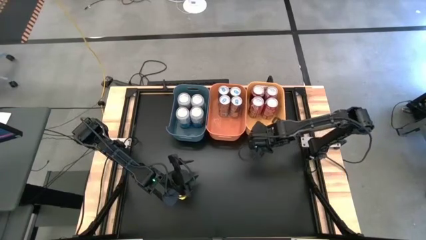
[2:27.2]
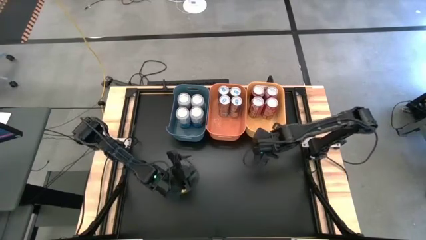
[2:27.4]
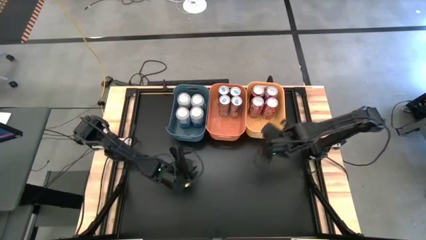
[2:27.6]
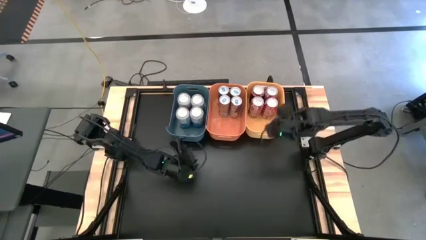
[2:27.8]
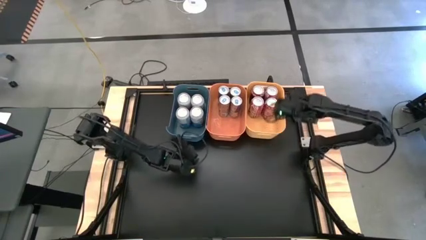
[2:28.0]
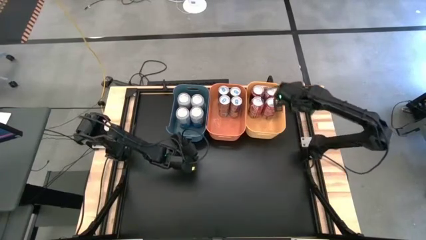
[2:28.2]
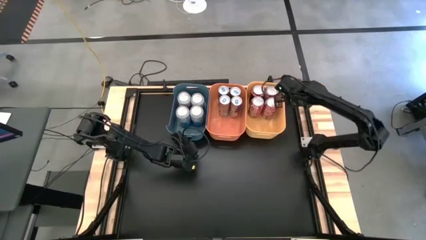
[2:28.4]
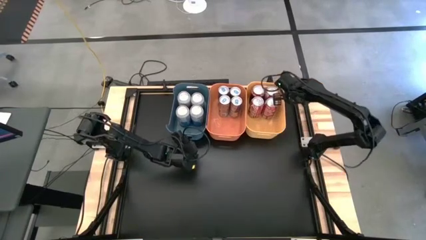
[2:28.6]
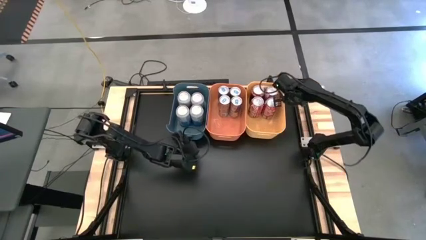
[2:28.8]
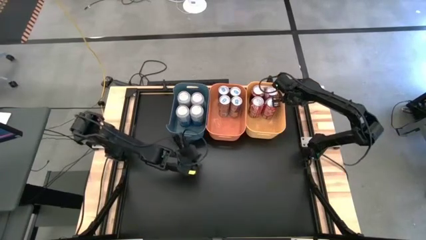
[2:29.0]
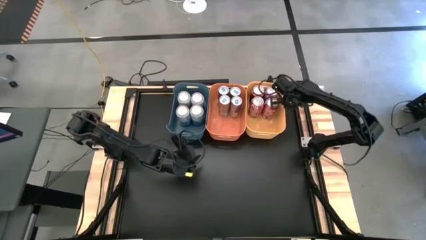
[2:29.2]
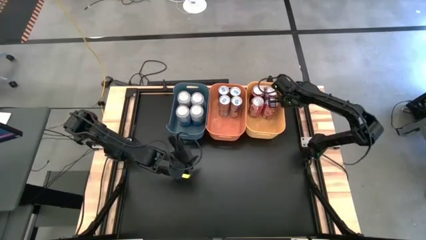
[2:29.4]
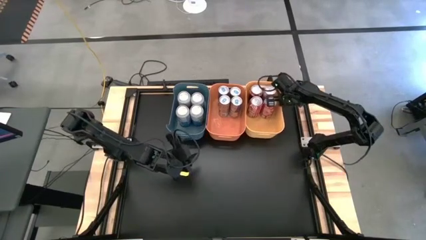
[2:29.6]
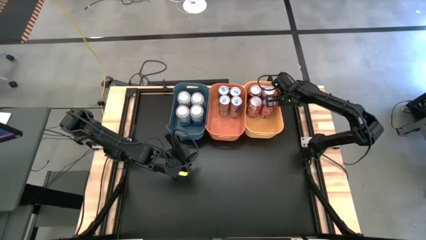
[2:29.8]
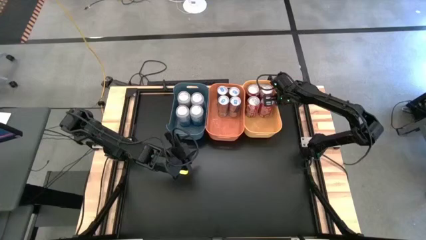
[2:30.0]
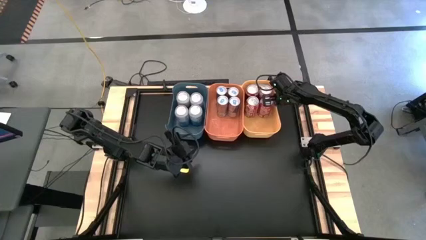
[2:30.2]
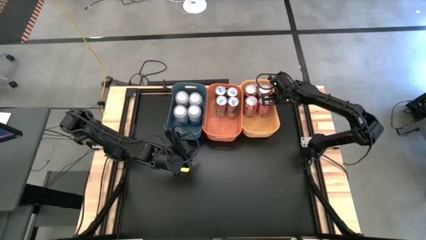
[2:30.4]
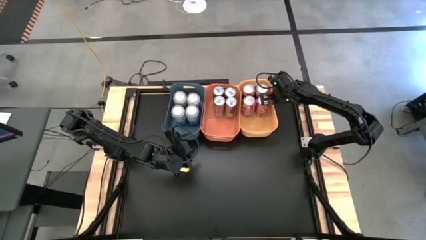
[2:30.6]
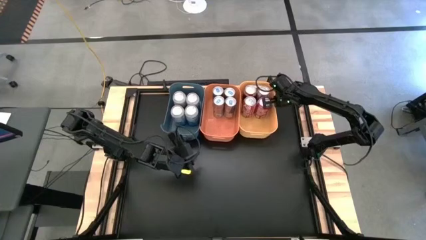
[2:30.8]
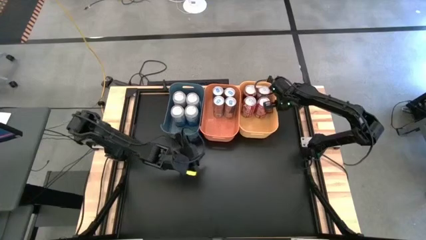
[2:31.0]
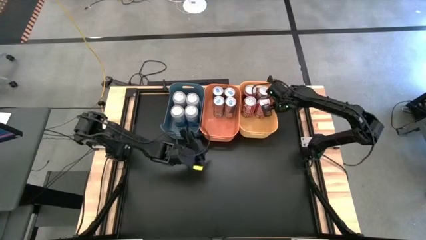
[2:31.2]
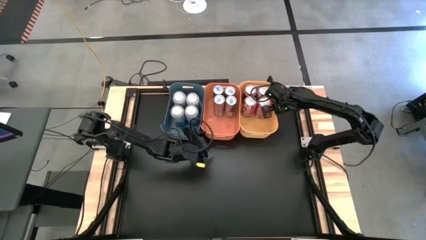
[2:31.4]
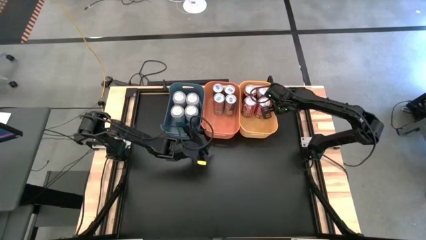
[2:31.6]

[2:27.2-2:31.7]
Task: Sort soda cans
Adjust the bins to align them on the table

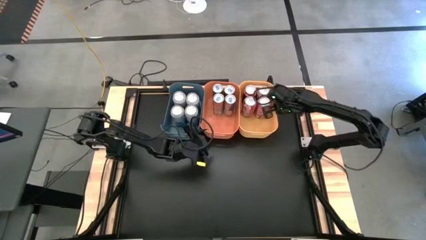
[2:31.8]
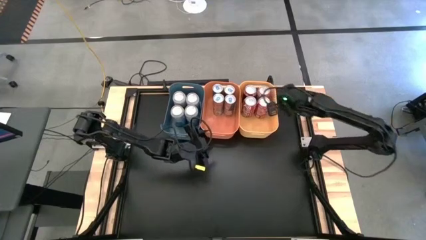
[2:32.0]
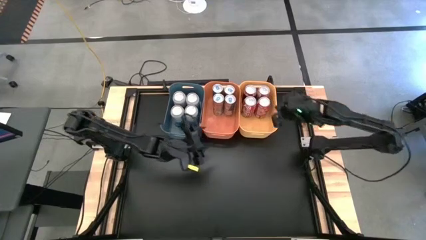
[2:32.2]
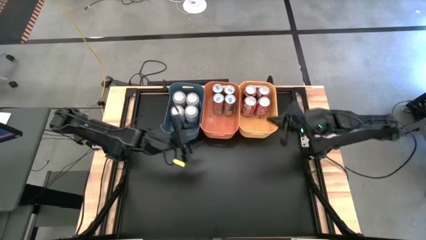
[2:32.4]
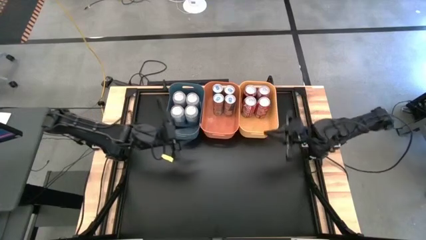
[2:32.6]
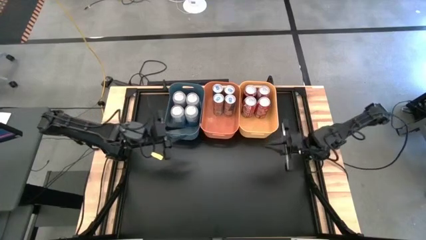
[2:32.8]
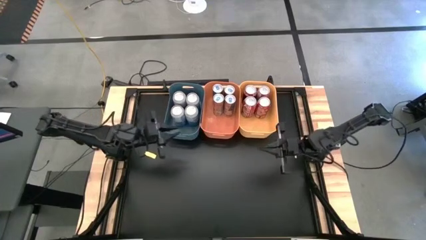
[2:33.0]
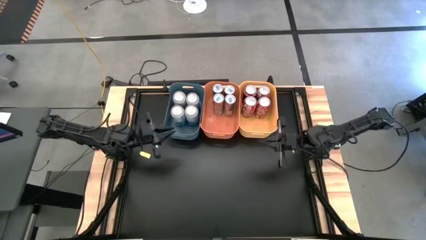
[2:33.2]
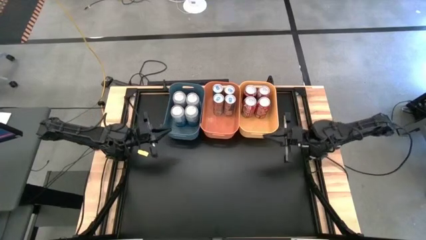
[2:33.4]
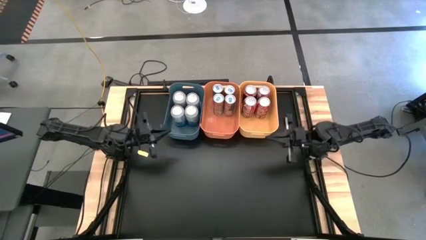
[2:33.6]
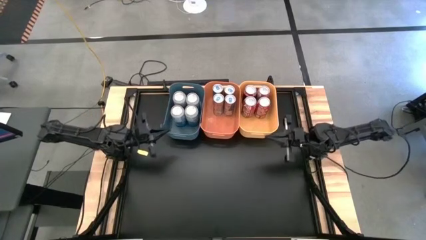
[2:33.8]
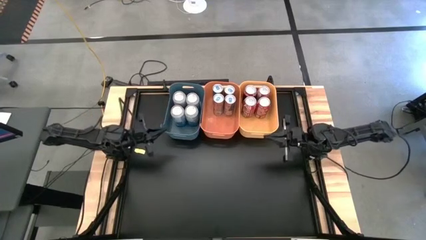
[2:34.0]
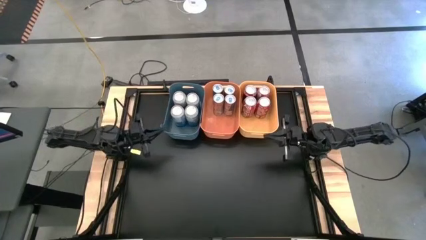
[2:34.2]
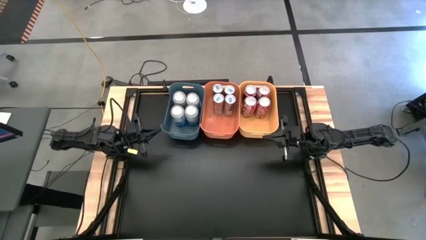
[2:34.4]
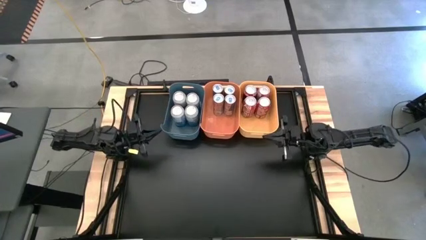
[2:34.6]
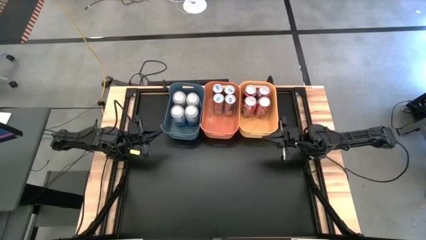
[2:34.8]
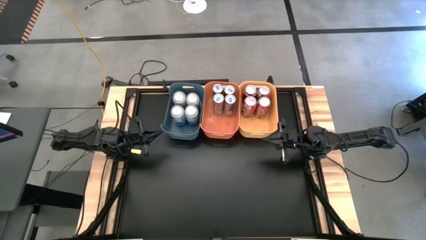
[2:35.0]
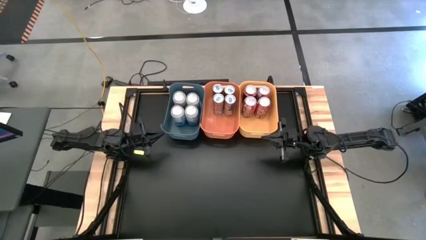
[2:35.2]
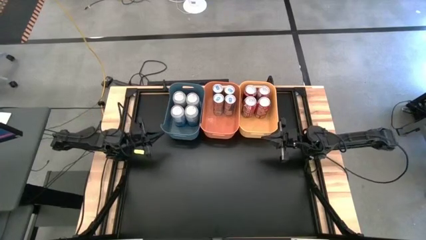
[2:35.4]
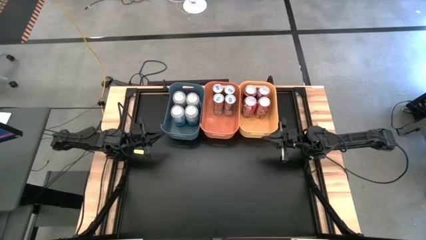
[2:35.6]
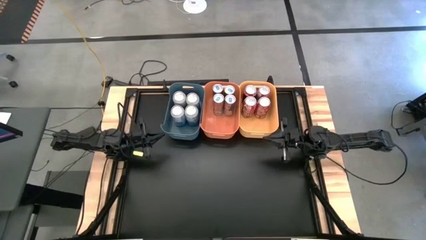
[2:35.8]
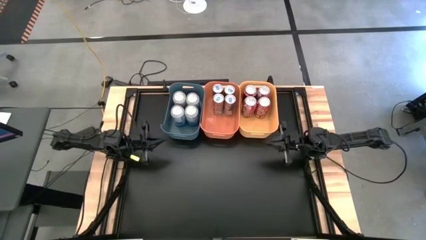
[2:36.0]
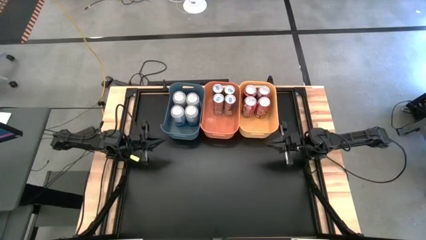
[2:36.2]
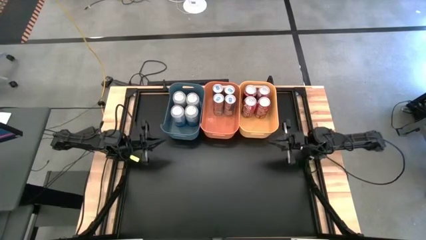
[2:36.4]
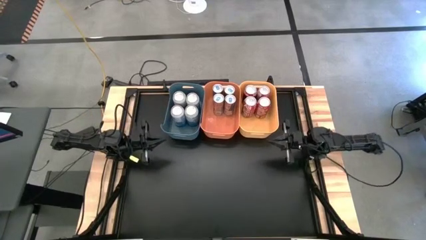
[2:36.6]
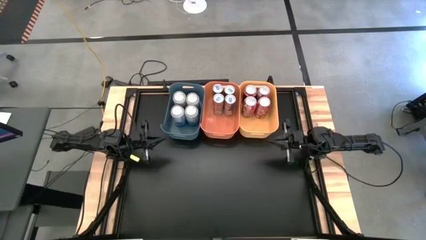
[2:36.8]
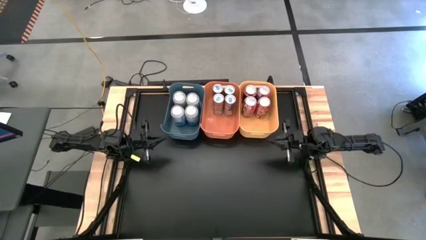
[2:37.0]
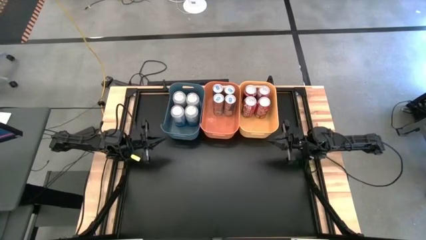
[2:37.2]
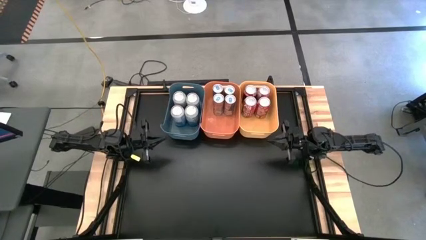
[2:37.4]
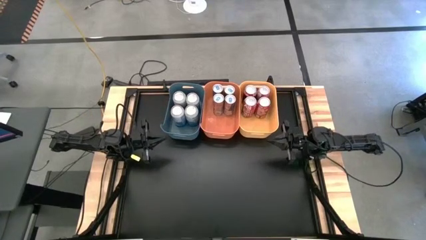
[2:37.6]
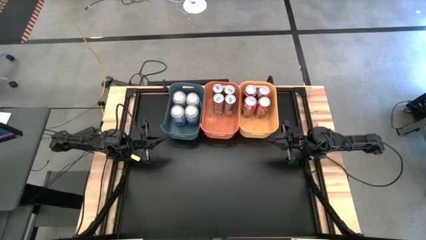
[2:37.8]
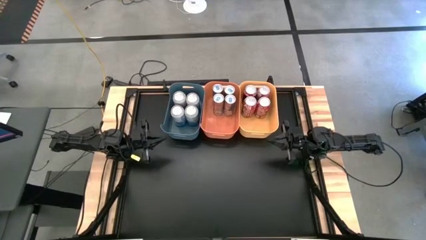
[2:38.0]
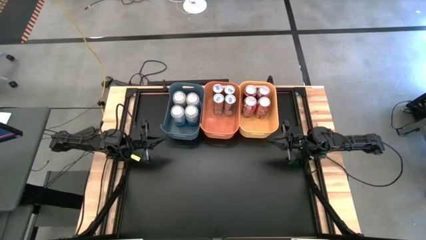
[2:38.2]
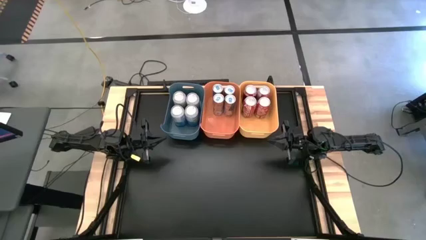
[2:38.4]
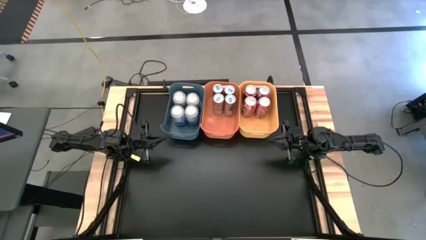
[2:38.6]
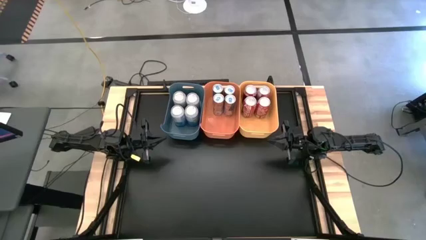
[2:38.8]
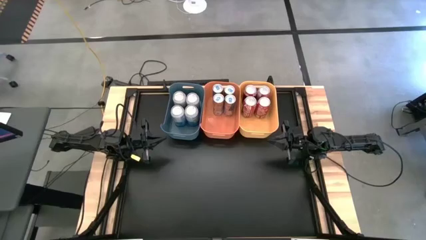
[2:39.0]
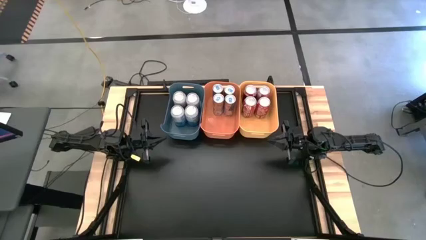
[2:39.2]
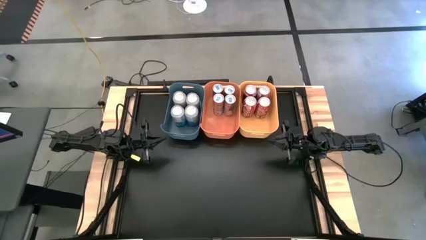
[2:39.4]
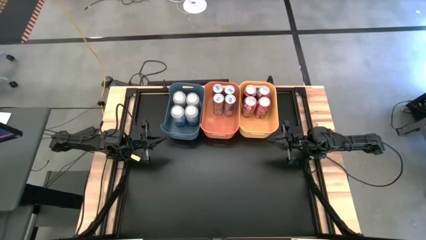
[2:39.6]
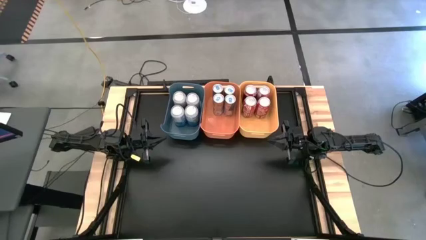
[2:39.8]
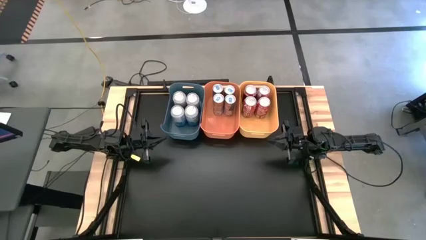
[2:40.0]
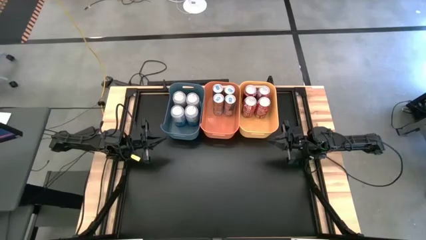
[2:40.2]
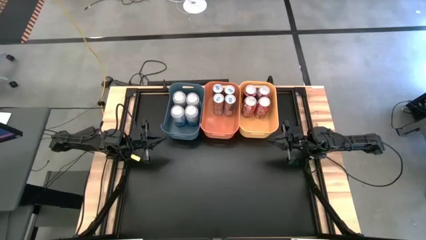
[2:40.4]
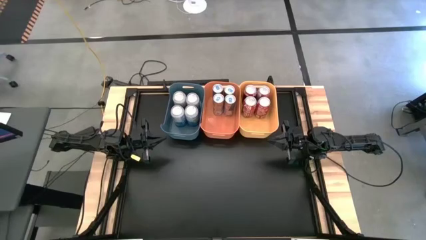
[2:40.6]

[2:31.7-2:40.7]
Return to Home Position
